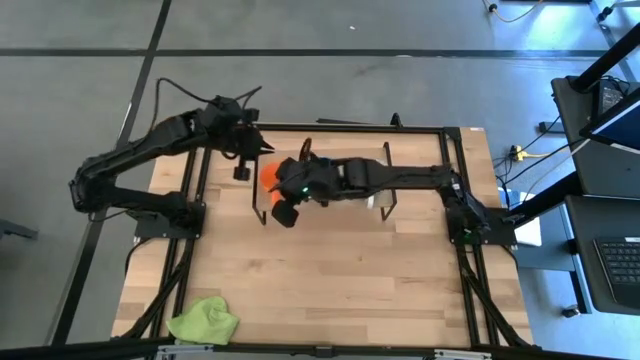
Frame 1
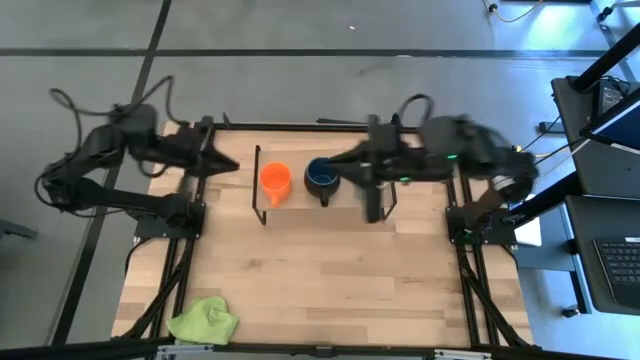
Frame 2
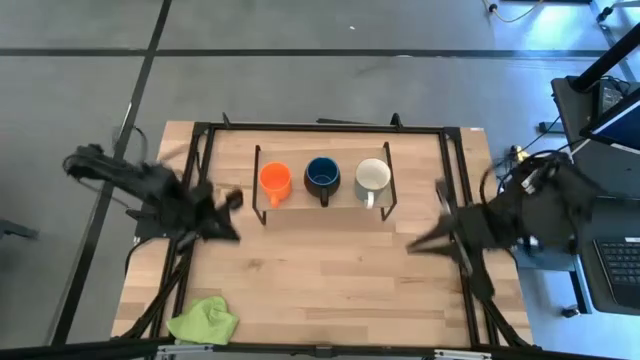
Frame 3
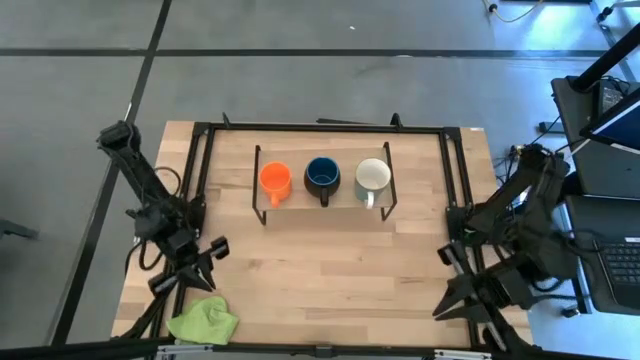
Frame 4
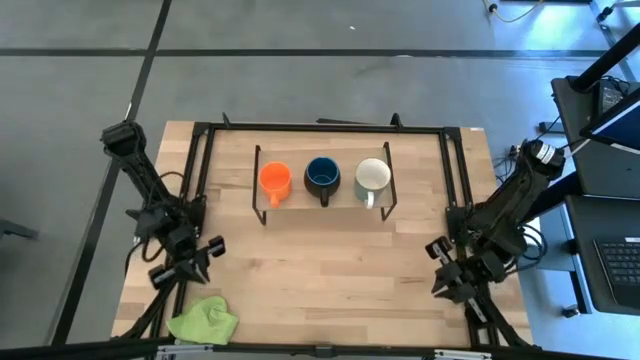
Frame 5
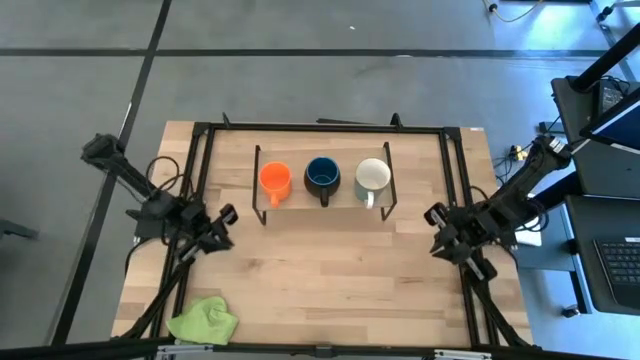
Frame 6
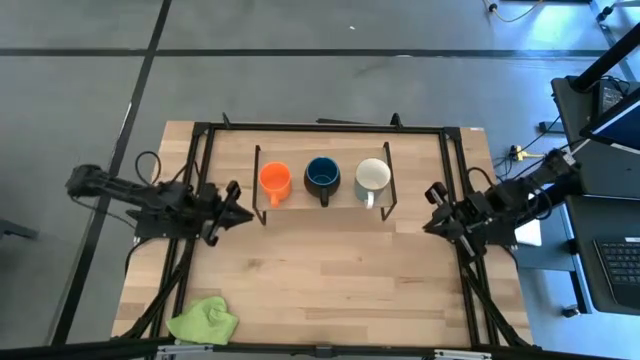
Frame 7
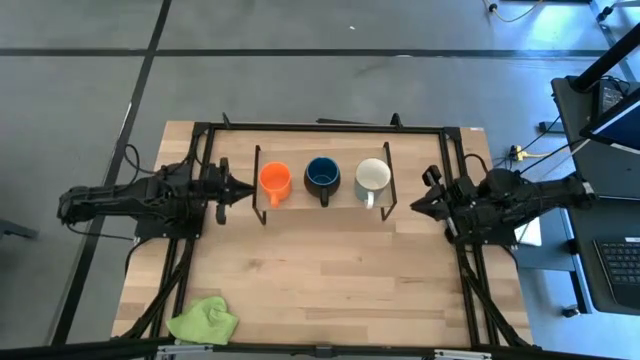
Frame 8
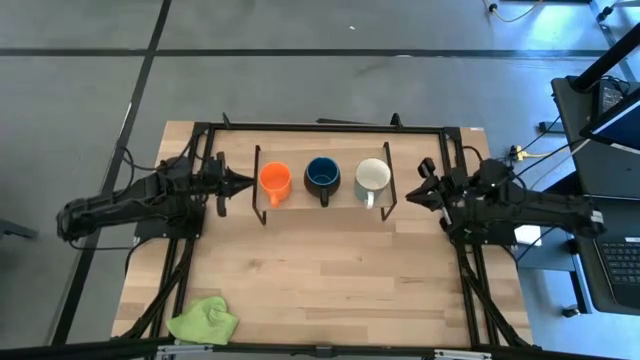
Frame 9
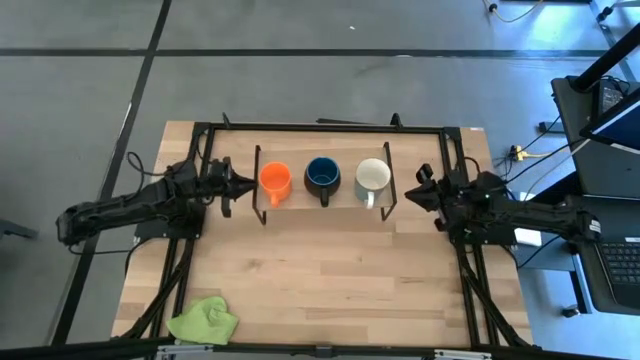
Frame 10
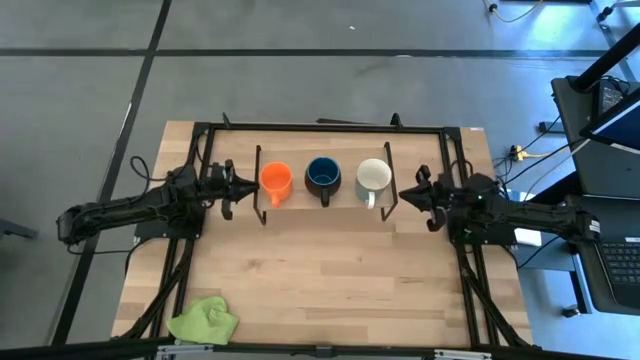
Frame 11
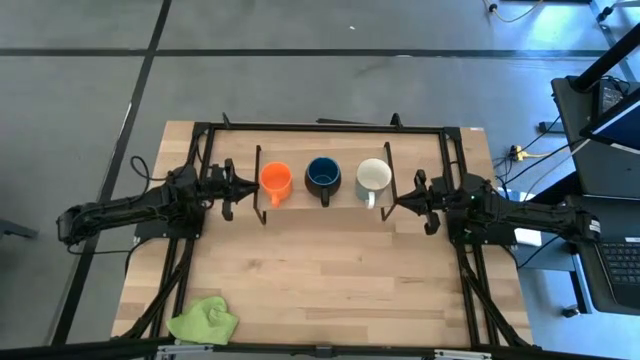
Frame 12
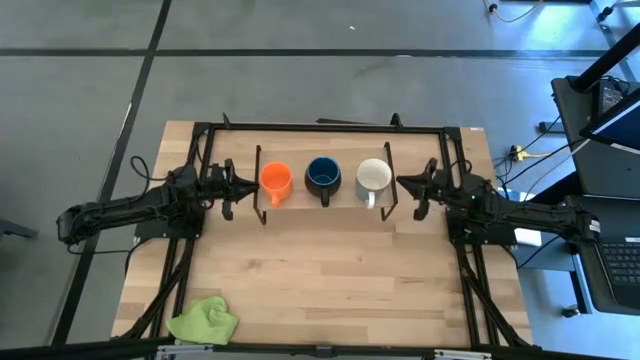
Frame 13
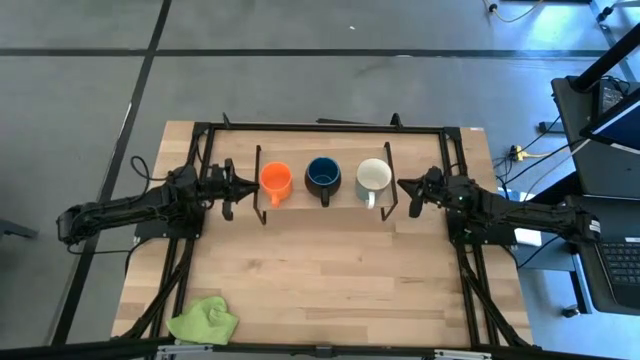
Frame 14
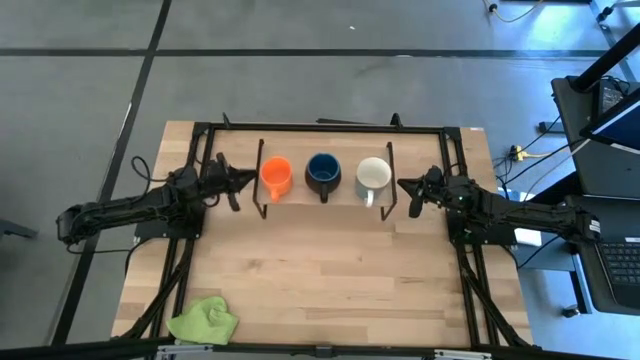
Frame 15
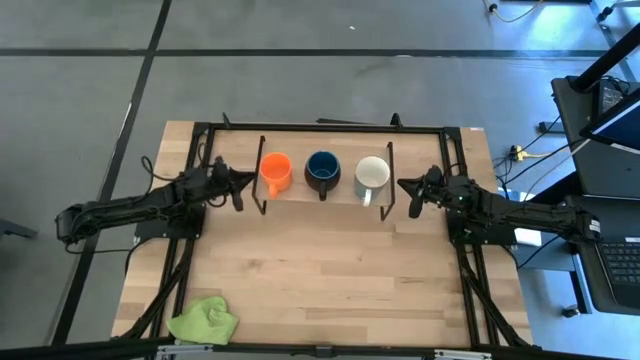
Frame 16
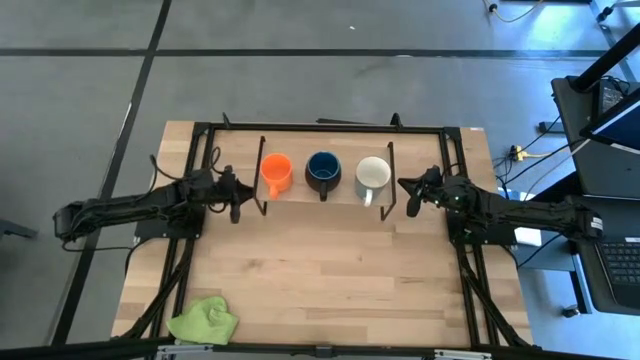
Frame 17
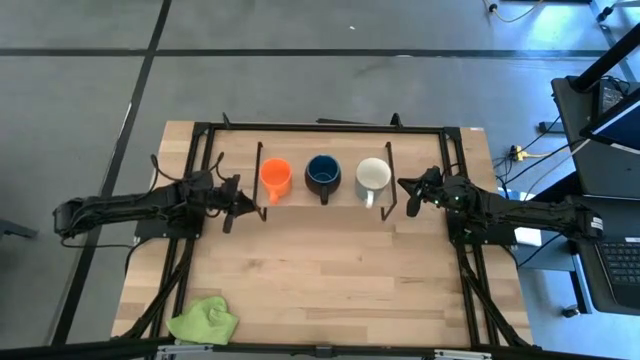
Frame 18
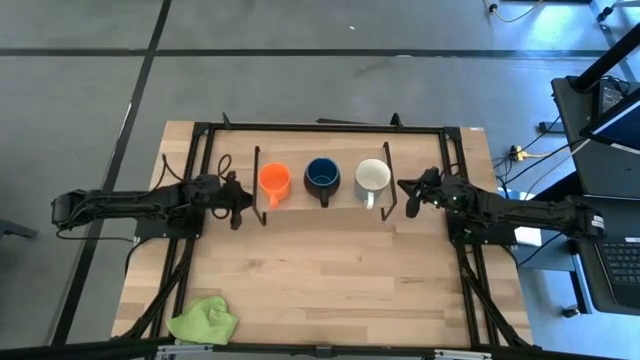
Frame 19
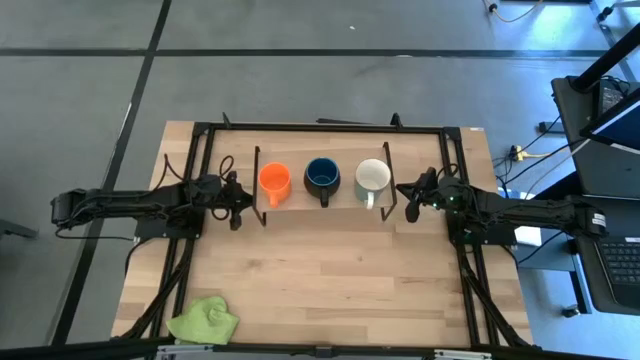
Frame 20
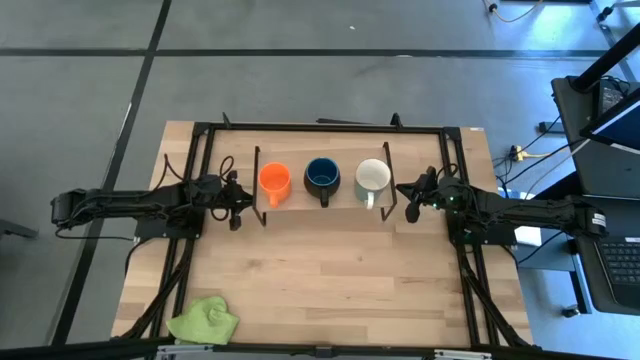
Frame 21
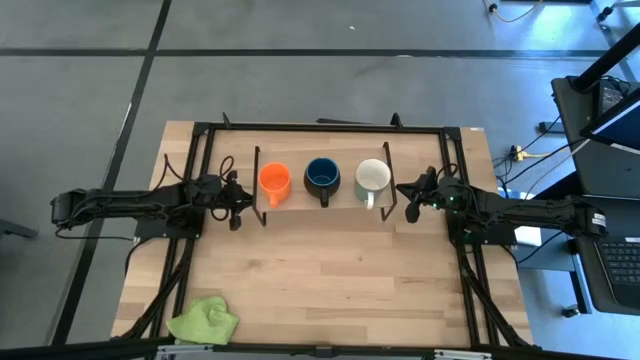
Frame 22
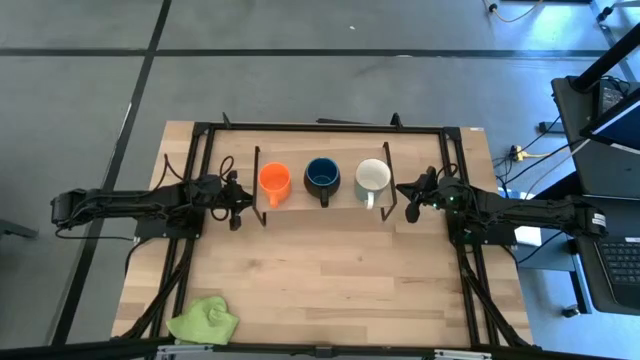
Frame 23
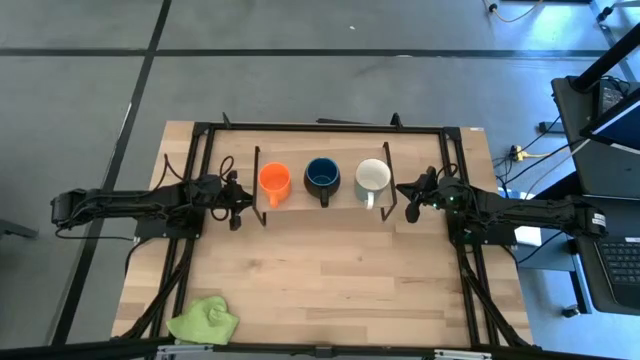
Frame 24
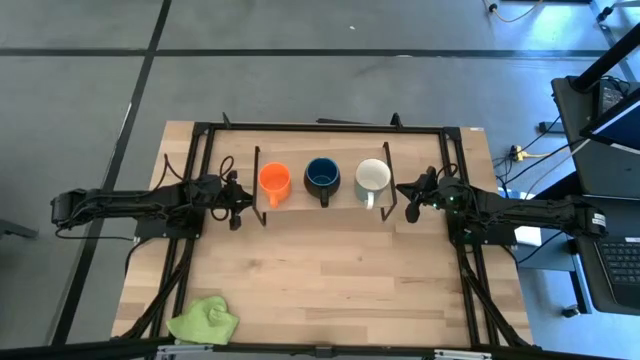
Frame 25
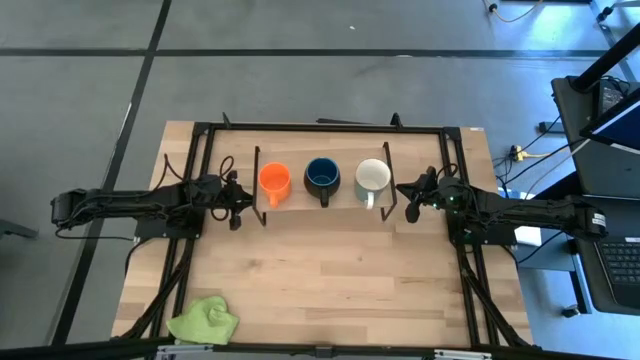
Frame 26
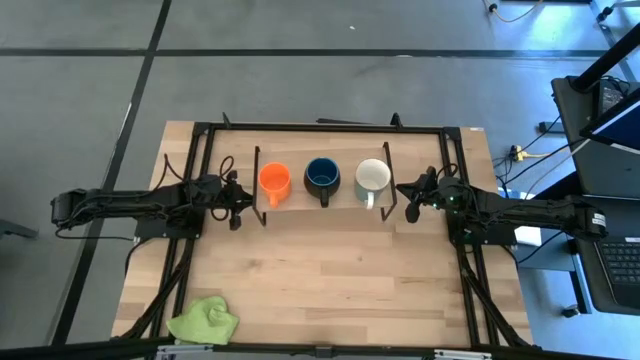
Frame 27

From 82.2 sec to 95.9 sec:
Task: Stack small to large cups/mugs on shelf
Return to Home Position

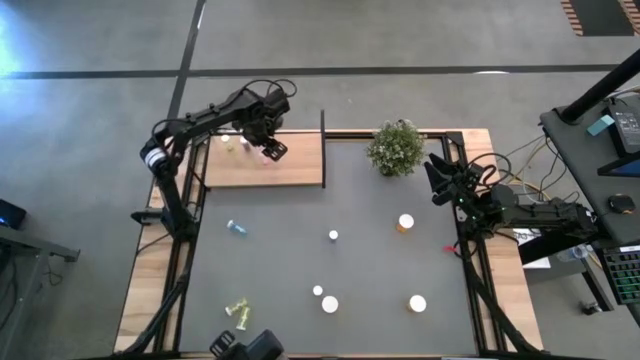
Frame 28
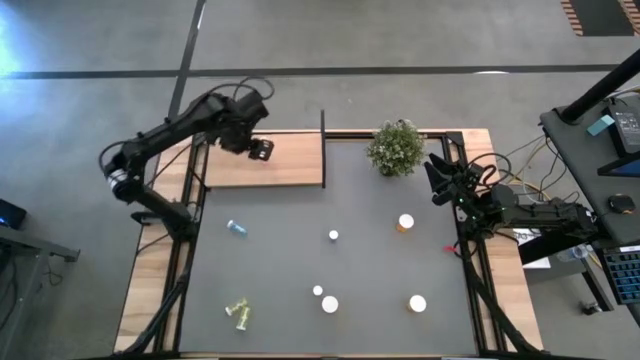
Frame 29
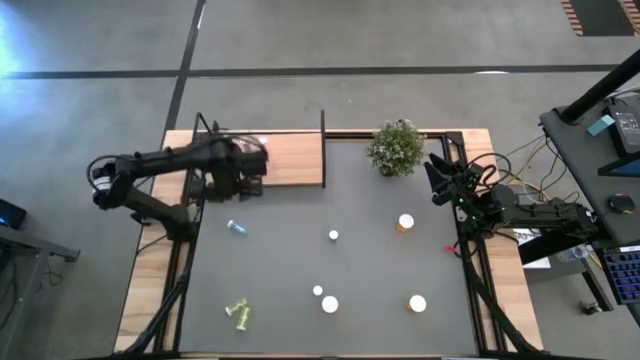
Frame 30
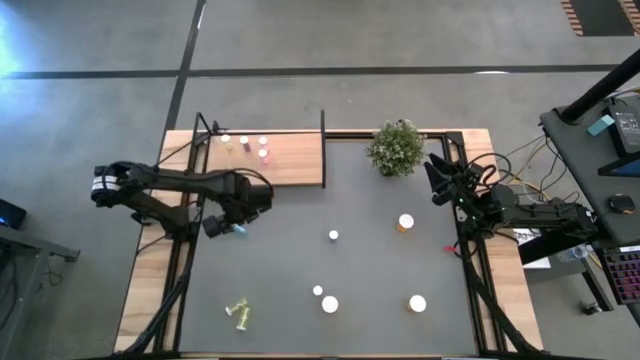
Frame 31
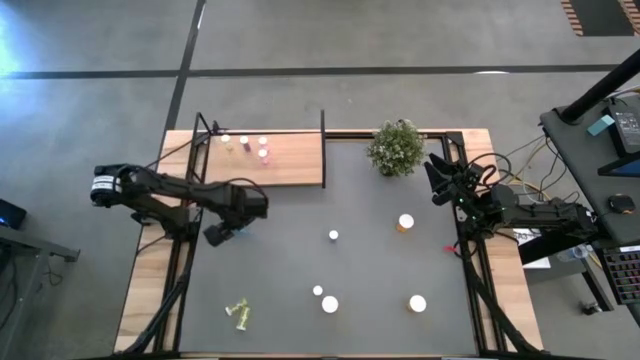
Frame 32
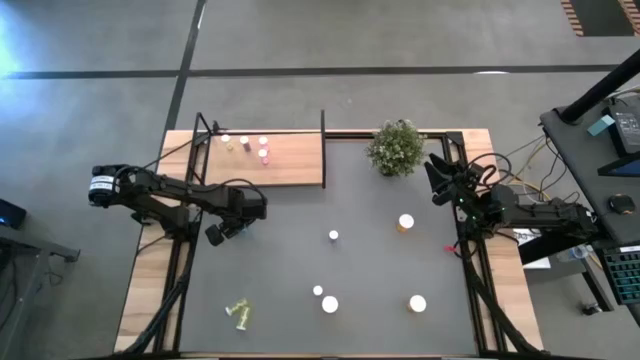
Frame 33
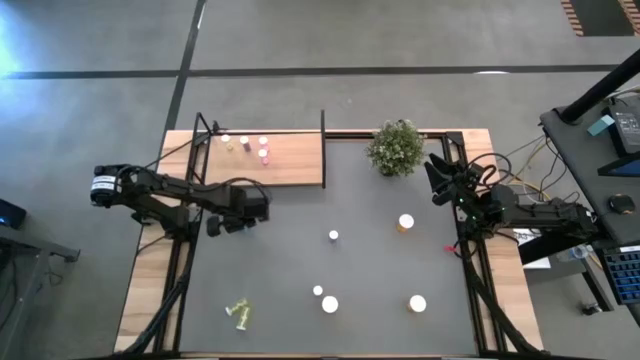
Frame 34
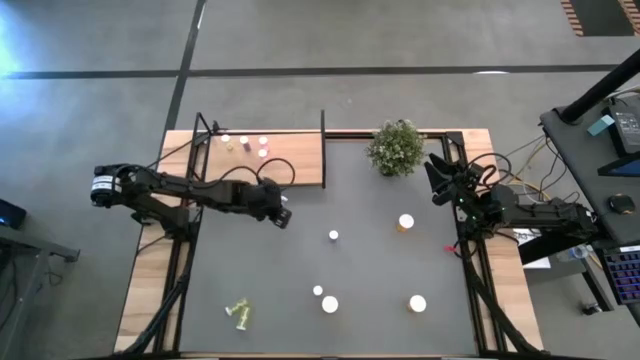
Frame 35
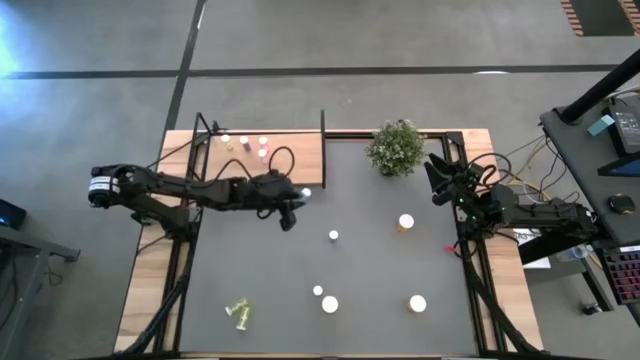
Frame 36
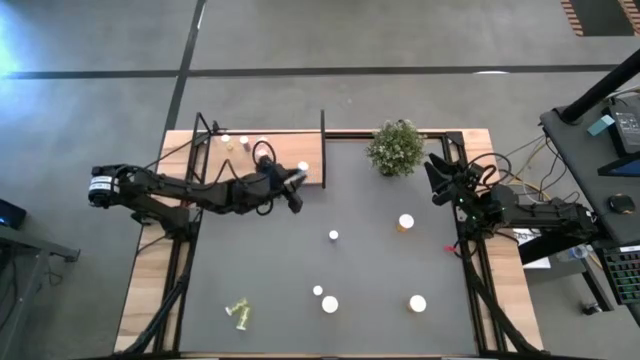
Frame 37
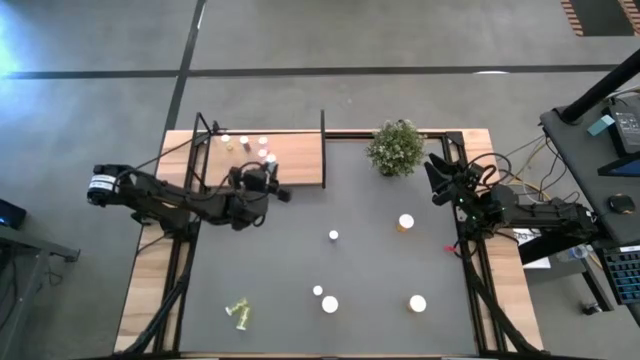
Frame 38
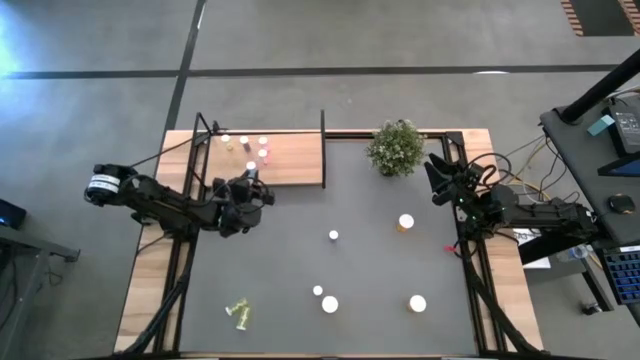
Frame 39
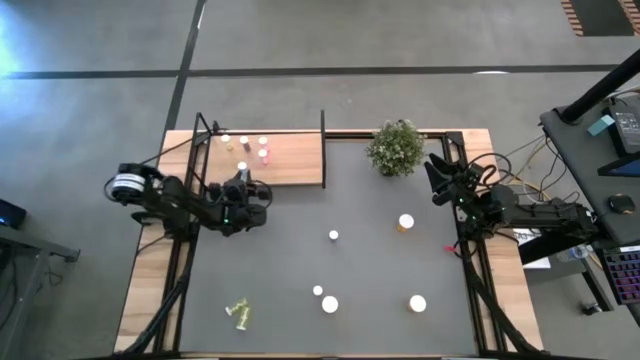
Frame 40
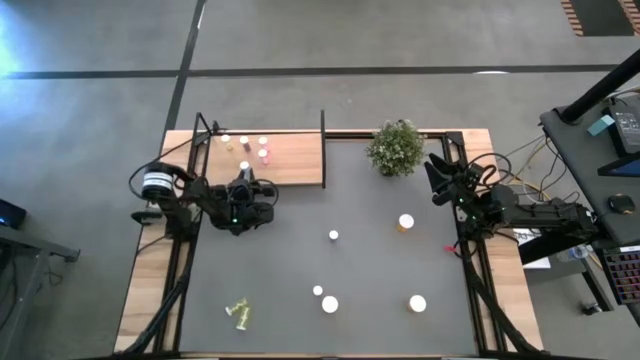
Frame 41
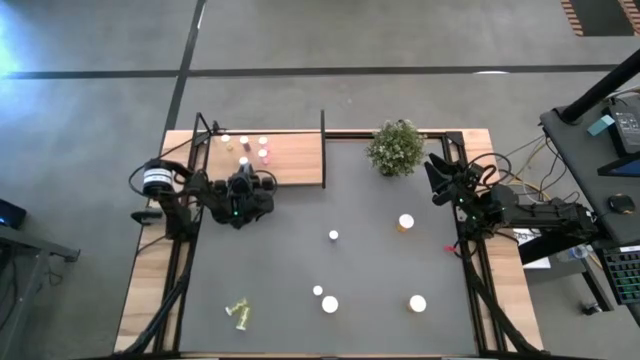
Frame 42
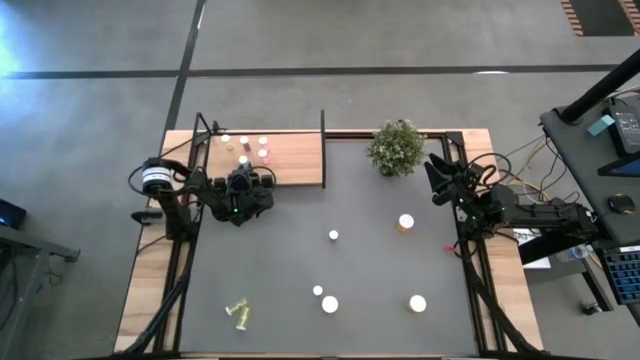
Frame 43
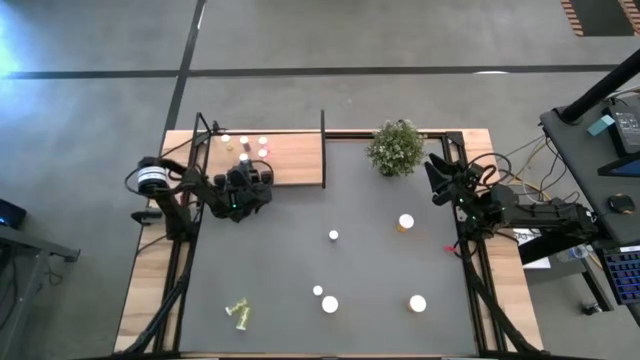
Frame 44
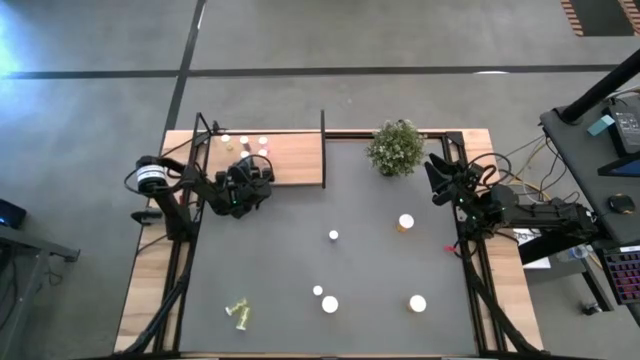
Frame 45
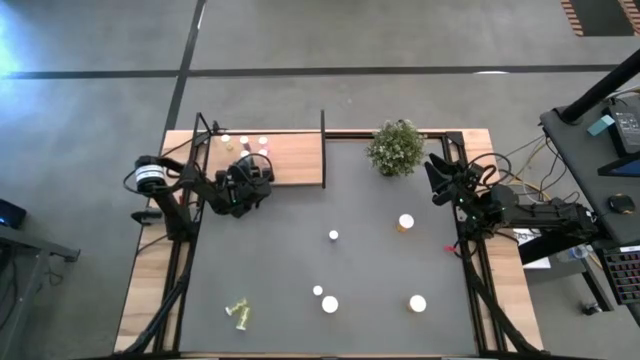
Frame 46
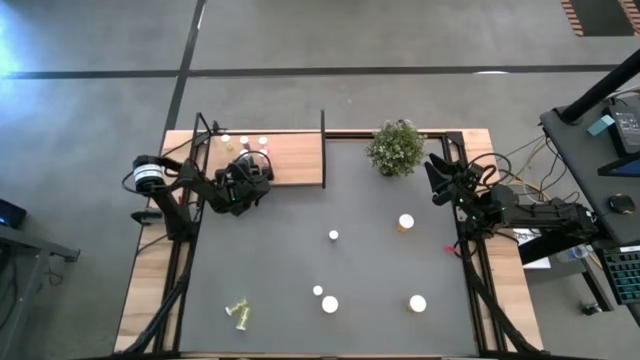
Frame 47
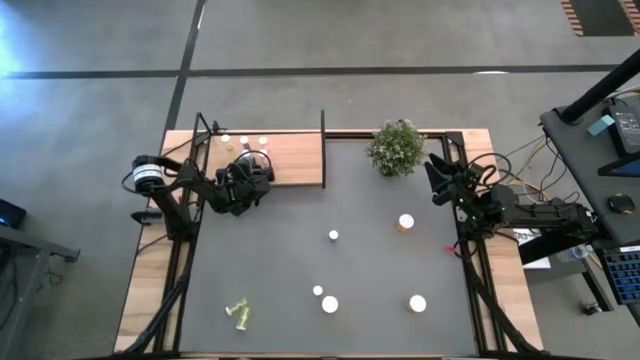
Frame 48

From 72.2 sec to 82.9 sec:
Task: Pick and place medicine bottles onto shelf by color
Put the left blue pill bottle on the shelf aligned with the other blue pill bottle
